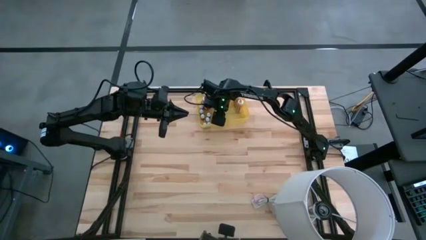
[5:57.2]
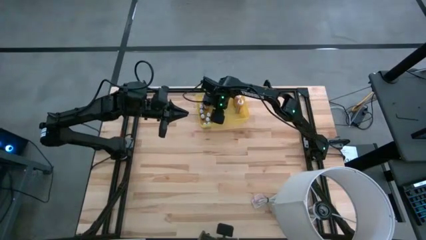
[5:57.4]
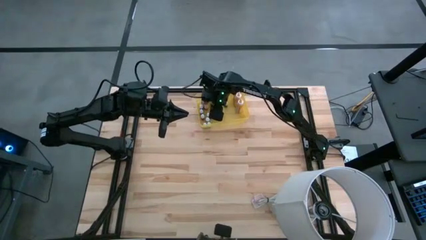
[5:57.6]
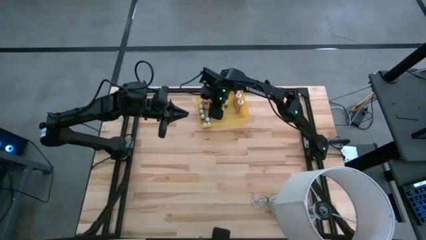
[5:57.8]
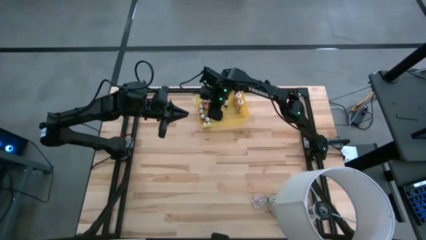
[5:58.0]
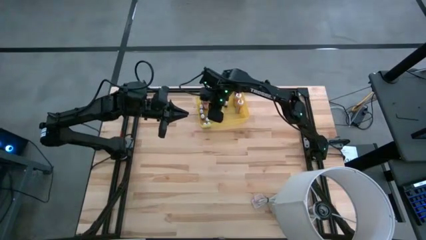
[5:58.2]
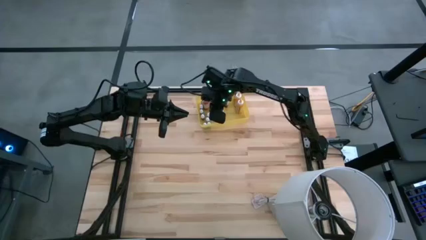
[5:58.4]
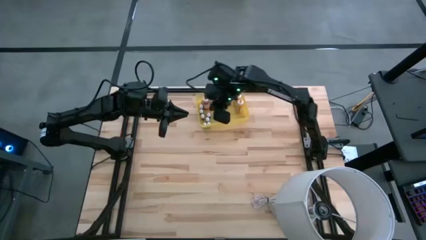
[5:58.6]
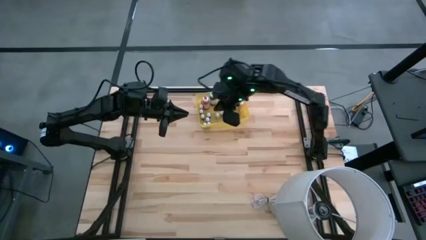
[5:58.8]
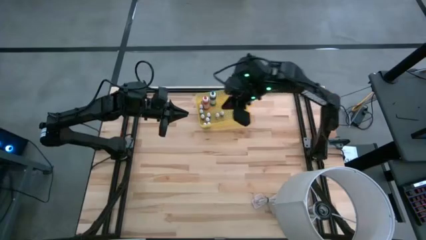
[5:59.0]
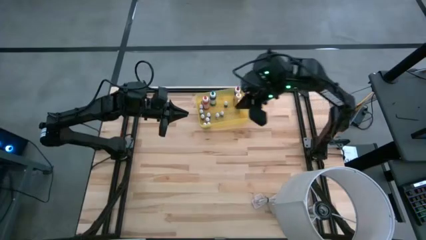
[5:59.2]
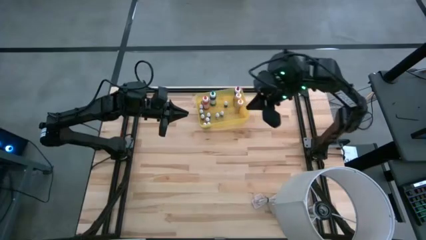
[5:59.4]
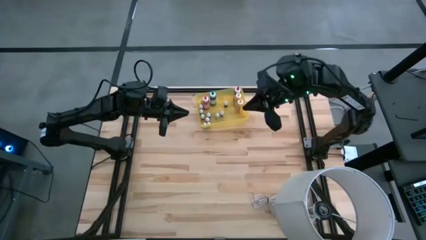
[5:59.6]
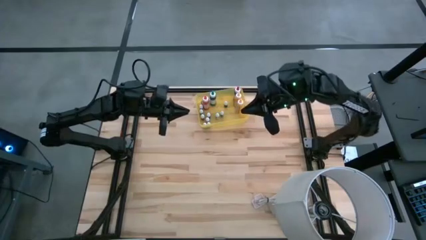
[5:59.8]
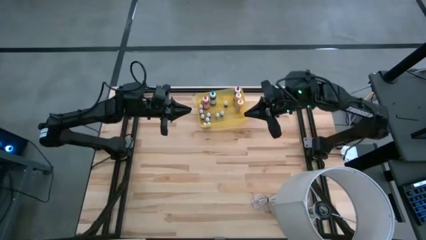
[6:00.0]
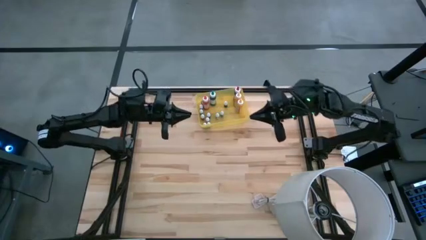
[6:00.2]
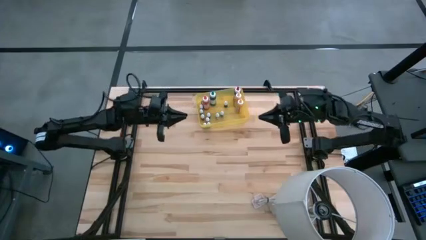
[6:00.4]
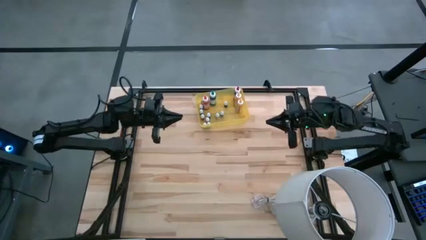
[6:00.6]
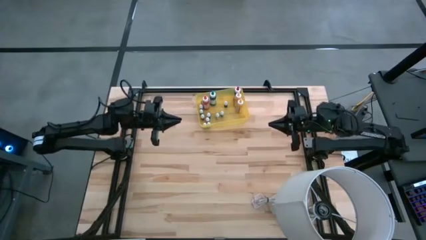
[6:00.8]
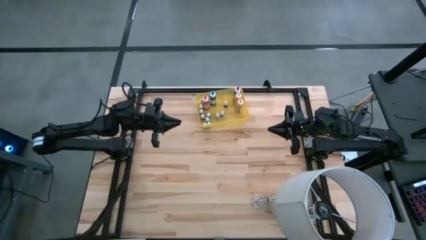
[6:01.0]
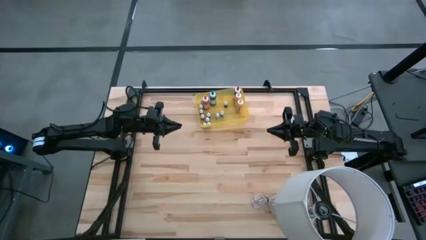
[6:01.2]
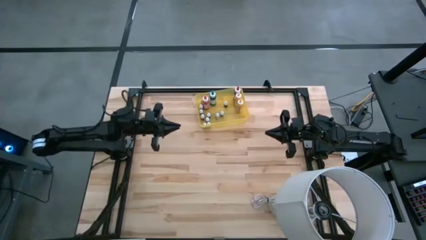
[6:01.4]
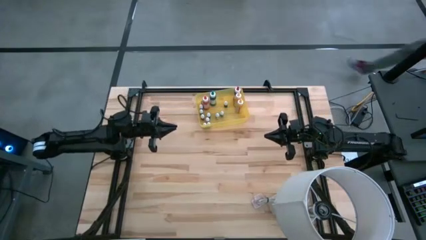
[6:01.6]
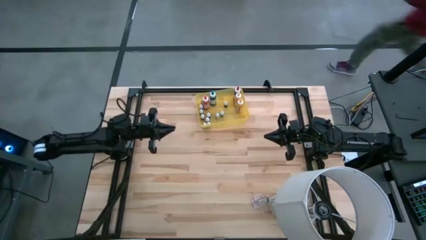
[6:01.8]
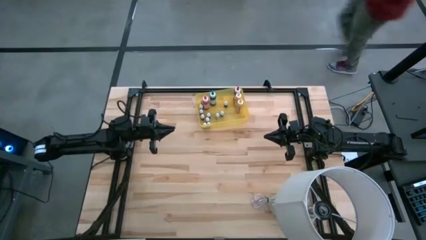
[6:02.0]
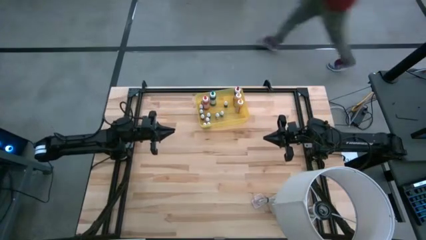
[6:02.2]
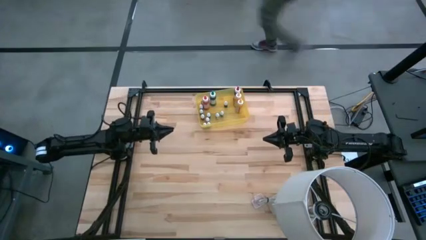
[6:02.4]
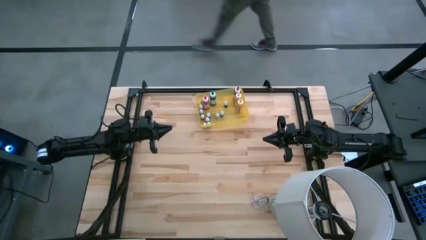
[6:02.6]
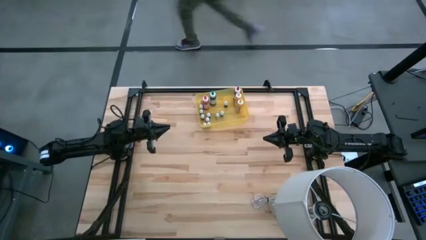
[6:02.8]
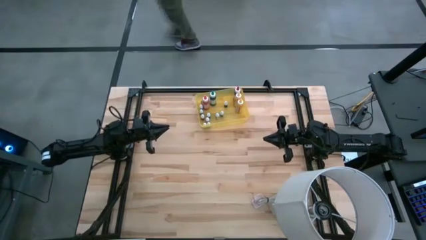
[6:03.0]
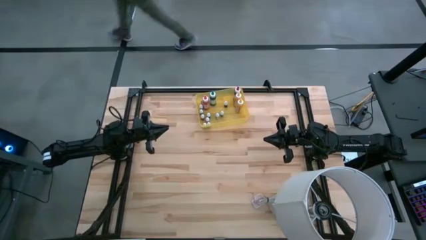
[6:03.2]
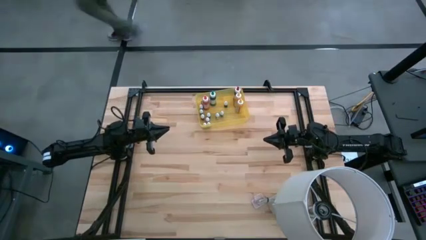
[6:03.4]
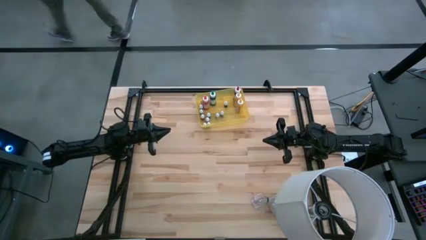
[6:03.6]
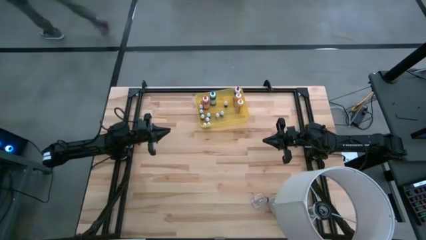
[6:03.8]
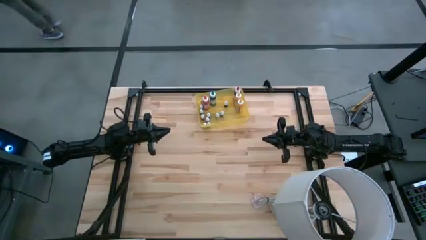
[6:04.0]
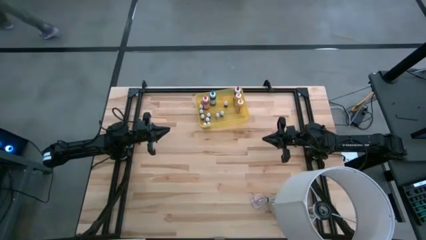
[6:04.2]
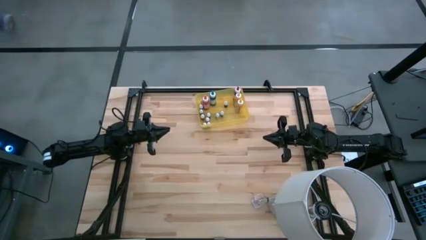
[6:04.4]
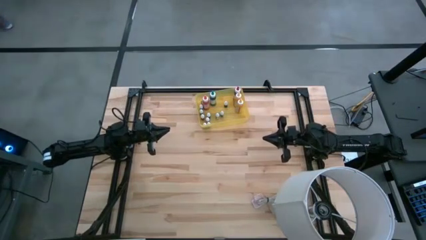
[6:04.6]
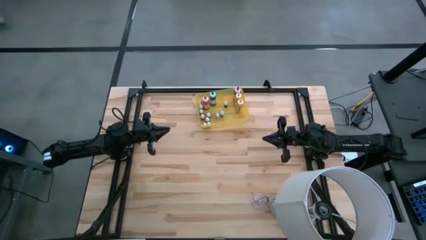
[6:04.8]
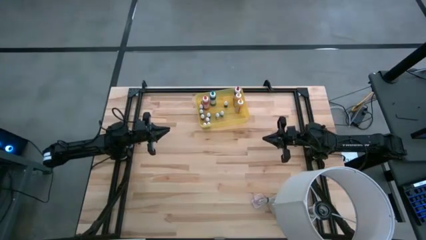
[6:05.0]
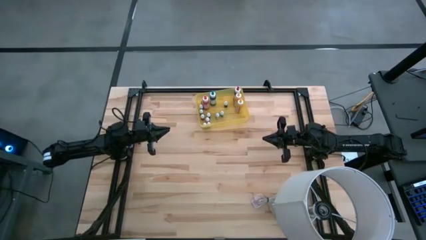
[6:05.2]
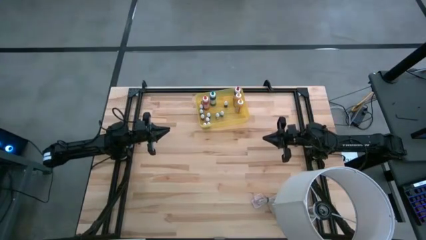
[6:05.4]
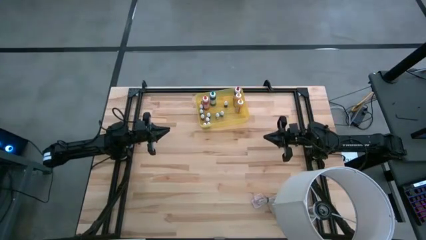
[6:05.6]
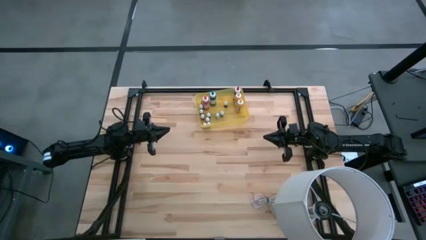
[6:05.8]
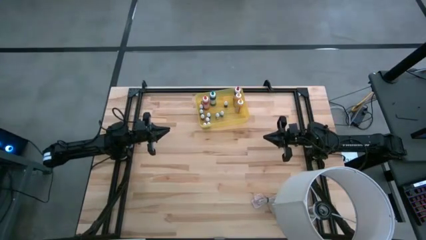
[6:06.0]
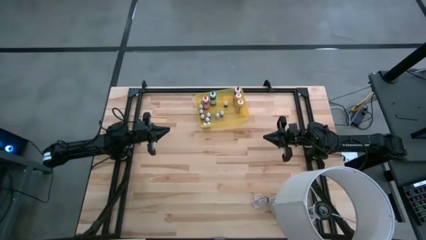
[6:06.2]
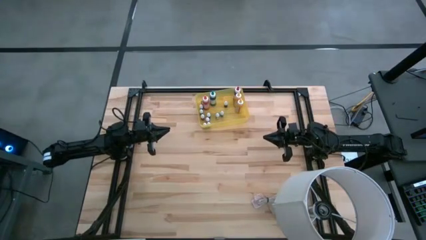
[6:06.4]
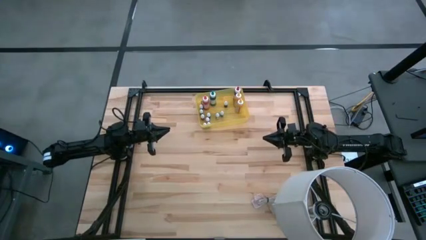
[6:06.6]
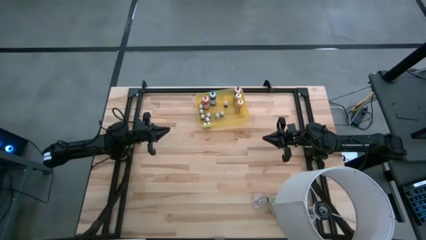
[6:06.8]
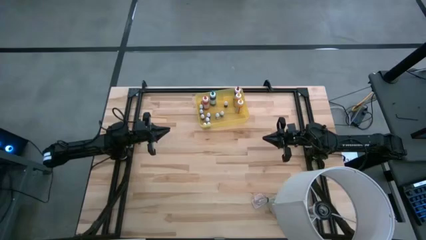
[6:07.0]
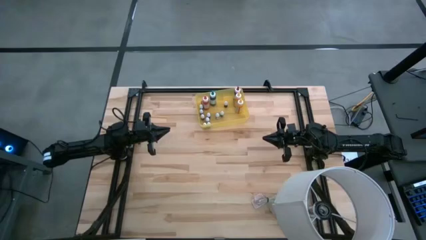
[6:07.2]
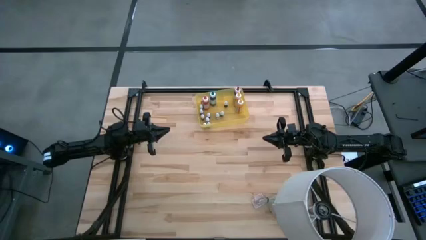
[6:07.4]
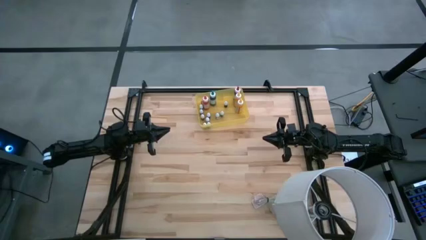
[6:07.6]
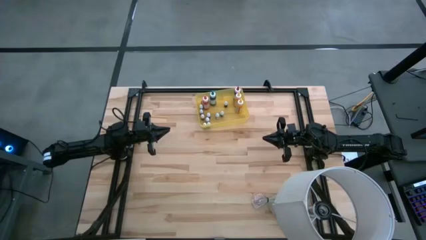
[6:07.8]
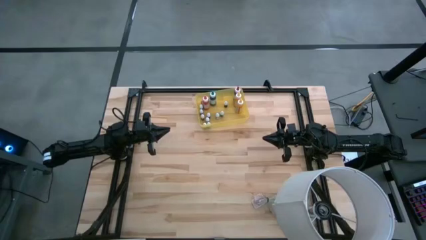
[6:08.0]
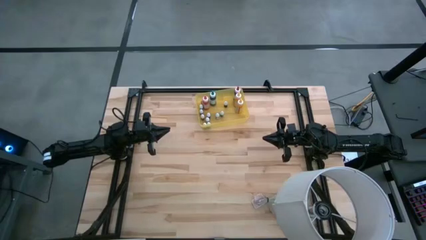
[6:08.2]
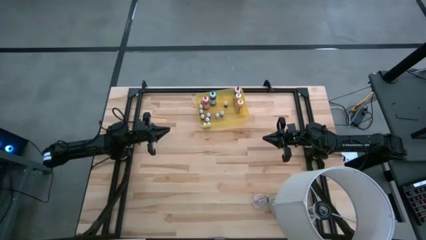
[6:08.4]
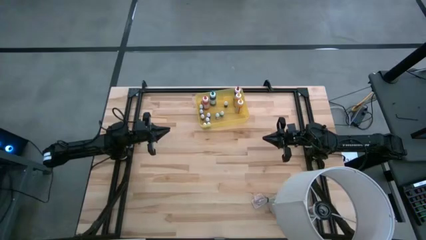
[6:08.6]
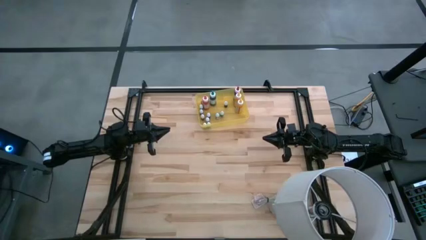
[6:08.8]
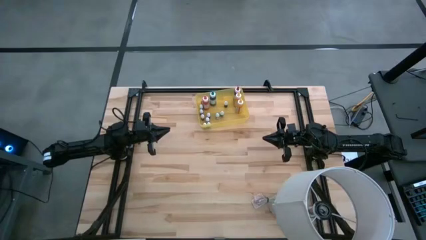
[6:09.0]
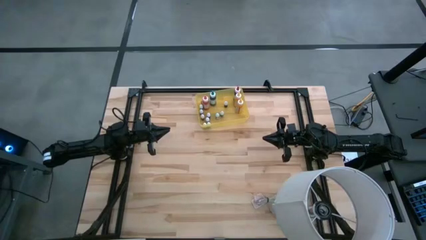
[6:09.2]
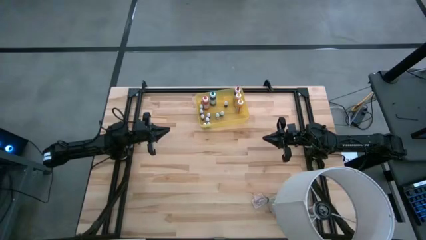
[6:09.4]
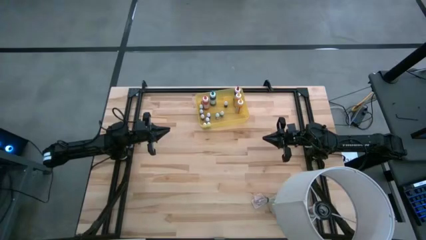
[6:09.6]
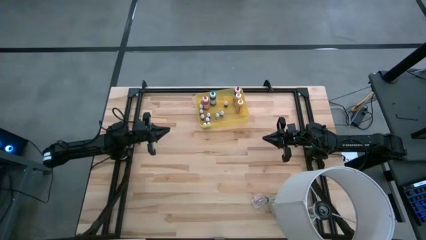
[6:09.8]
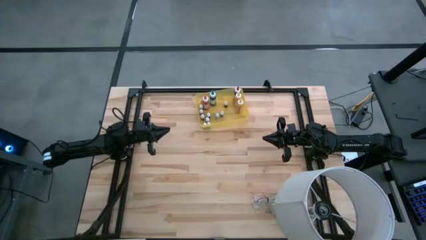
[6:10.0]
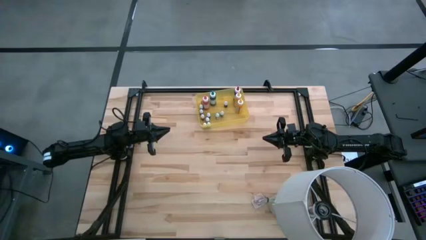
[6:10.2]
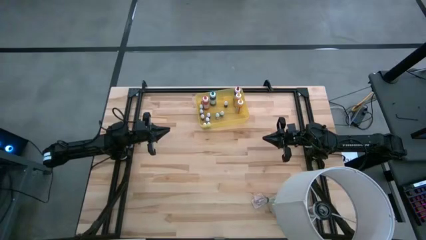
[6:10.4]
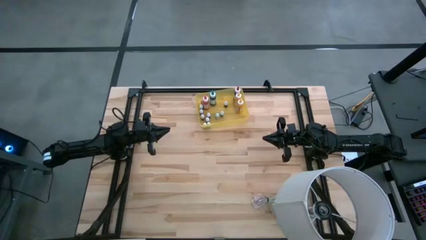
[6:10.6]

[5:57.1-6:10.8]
Task: Pick & Place food coloring
Return to Home Position
